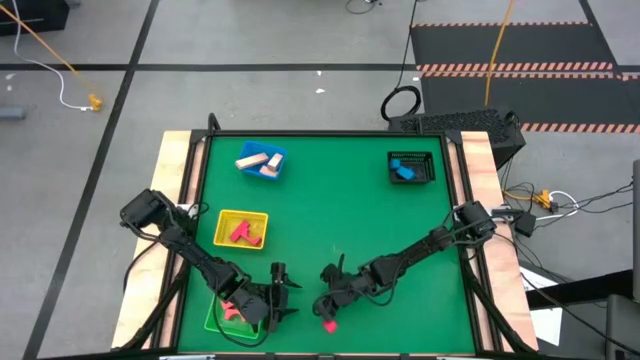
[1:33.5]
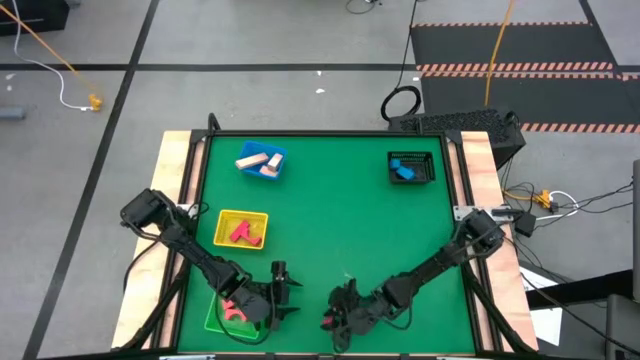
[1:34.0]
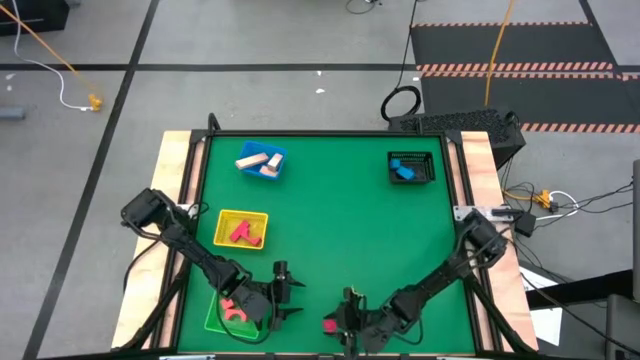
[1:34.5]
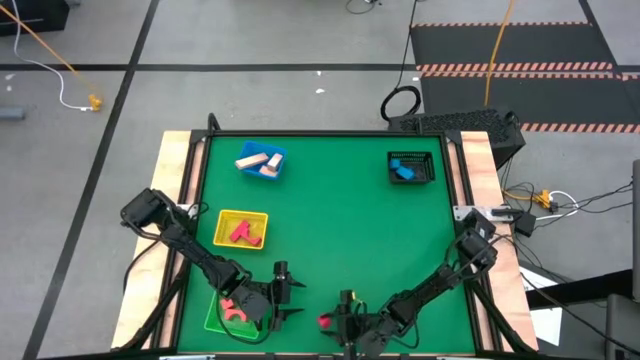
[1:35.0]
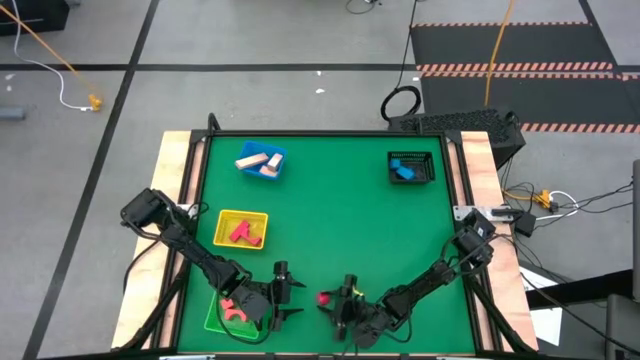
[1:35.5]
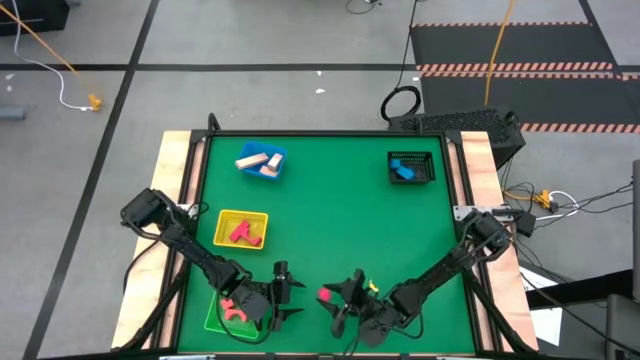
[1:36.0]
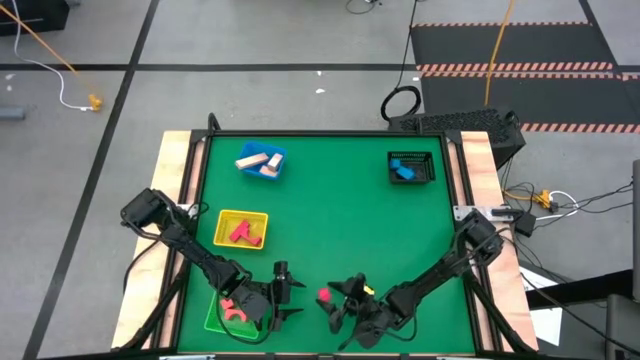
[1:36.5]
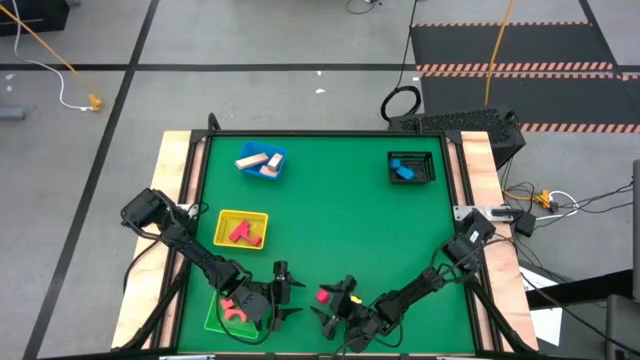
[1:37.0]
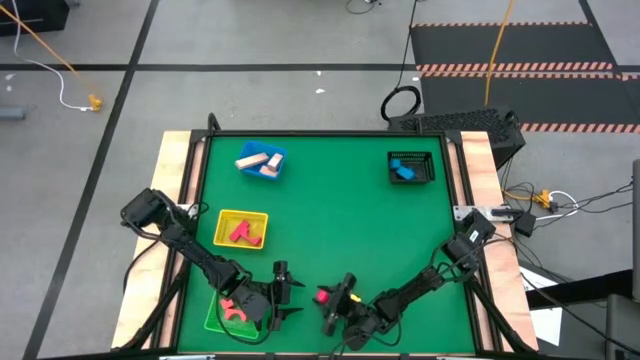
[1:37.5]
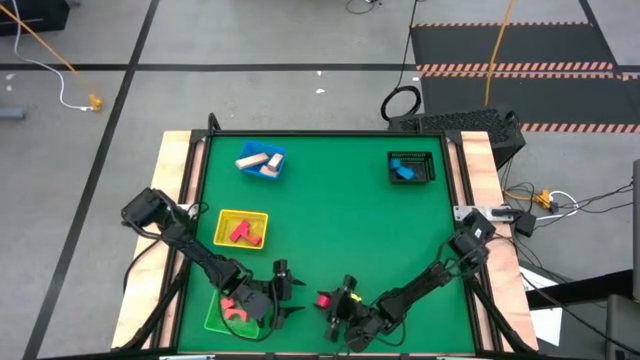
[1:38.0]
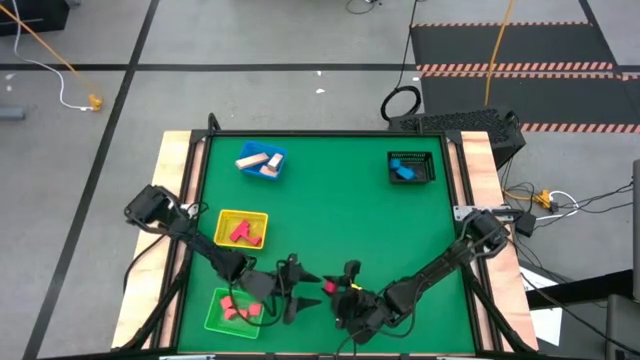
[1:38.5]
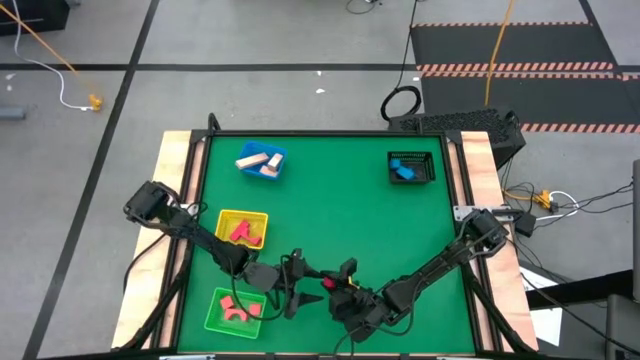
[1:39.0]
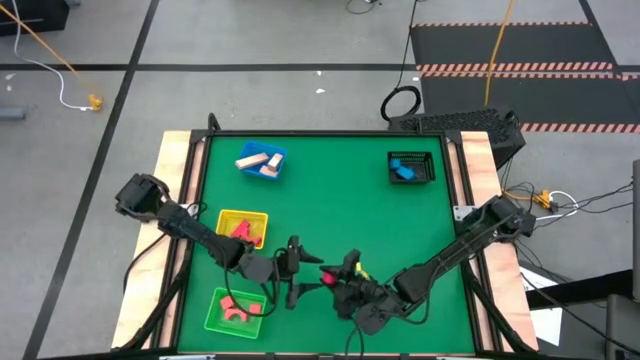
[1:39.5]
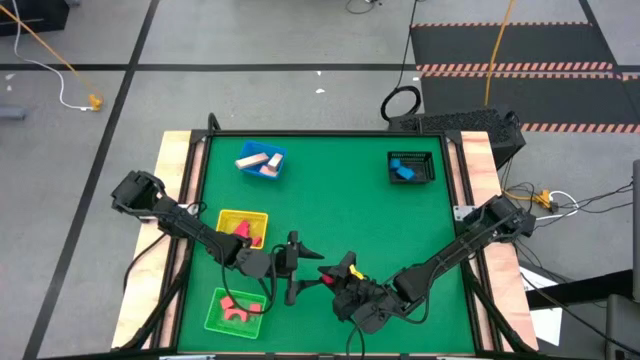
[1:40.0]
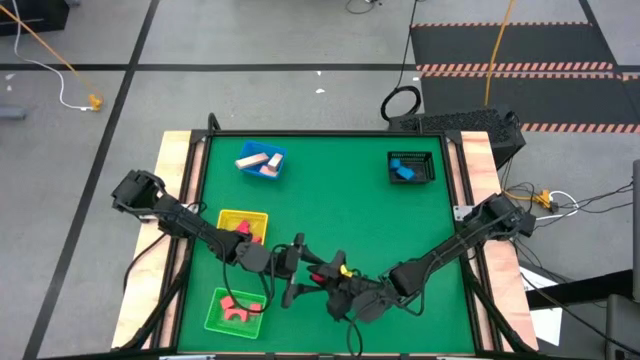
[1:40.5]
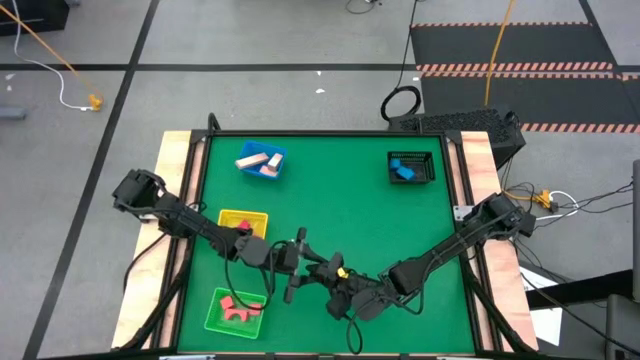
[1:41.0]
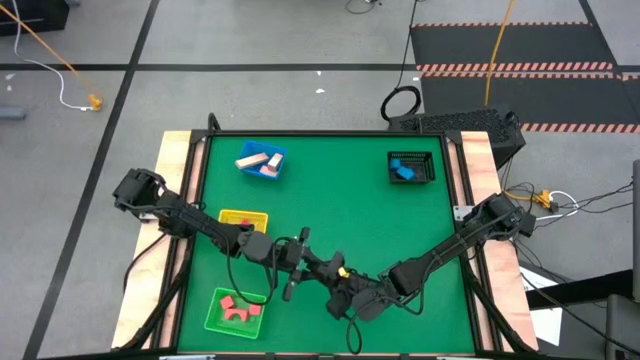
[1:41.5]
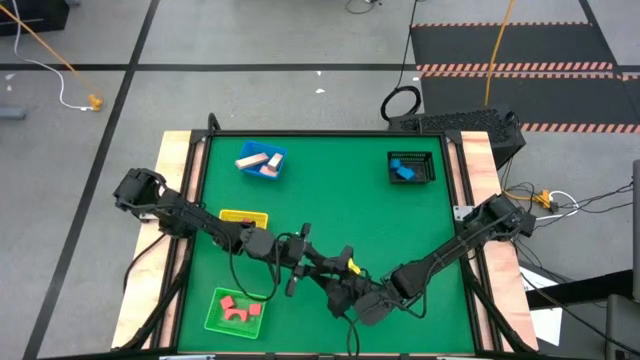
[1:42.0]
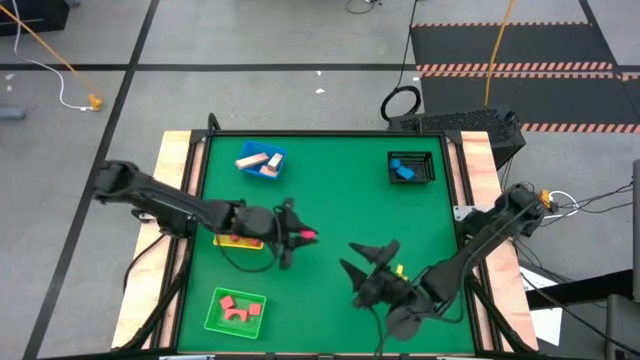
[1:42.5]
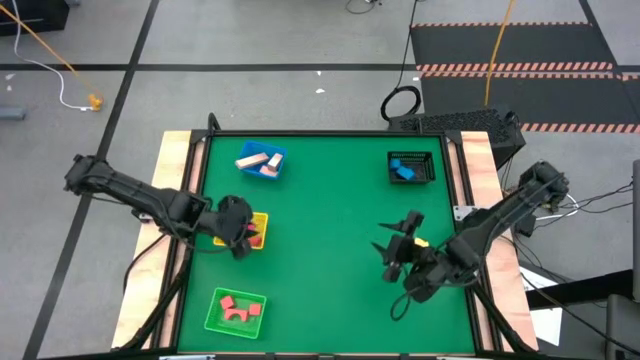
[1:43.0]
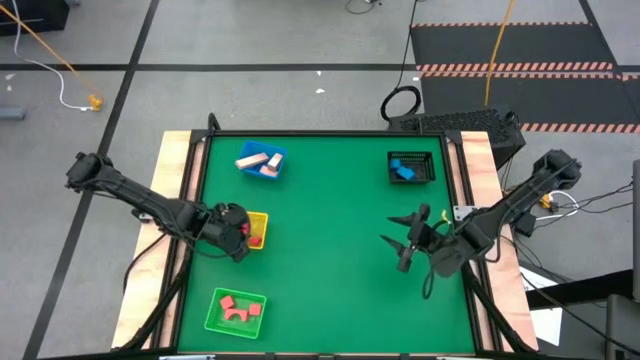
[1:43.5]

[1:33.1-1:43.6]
Task: Sort & place blocks by color
Put the red block into the yellow bin

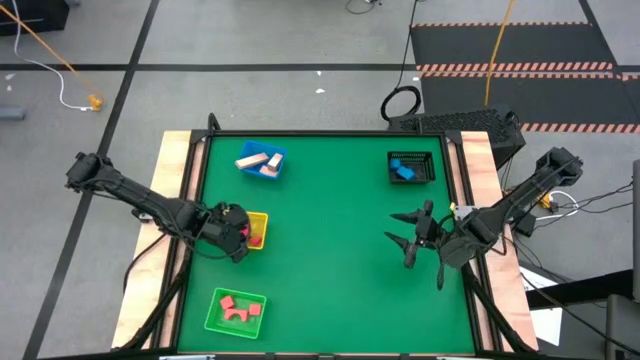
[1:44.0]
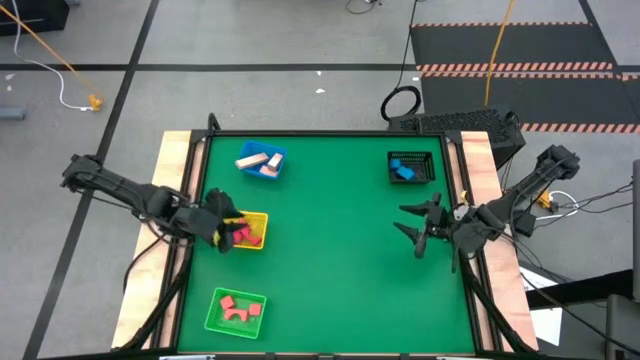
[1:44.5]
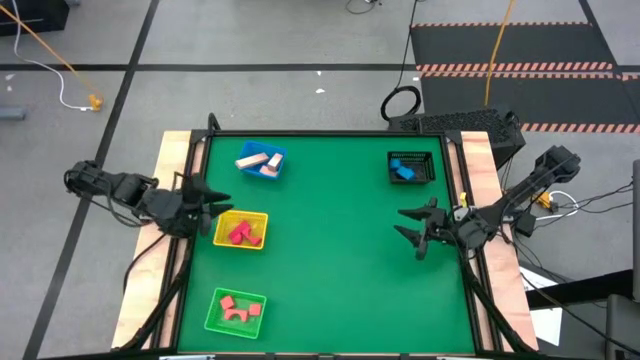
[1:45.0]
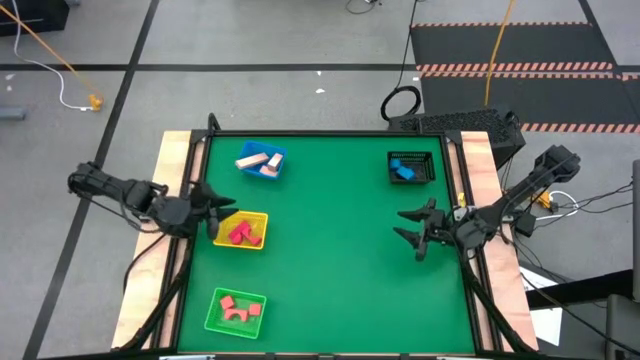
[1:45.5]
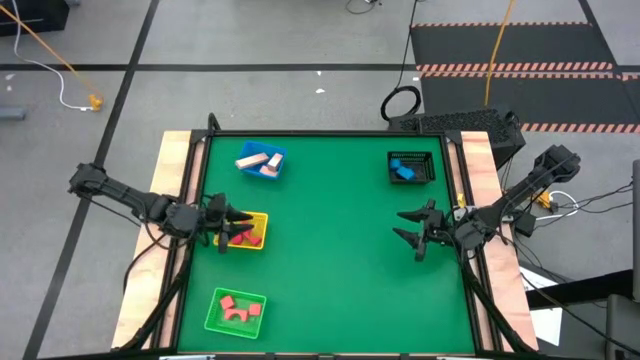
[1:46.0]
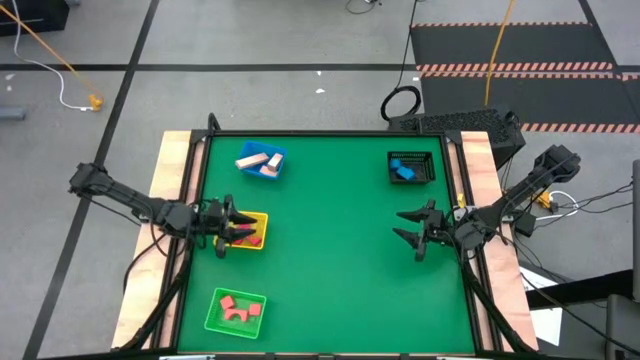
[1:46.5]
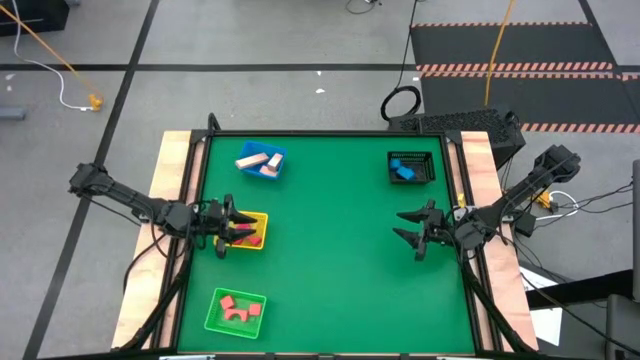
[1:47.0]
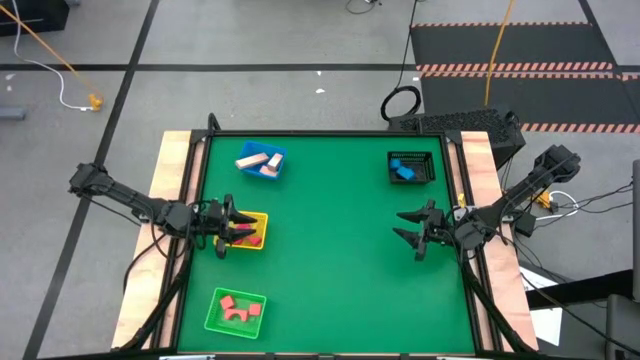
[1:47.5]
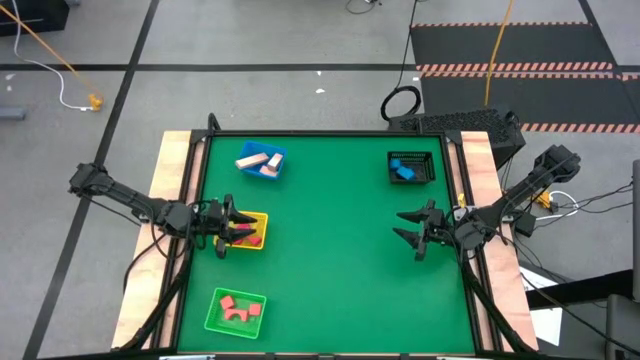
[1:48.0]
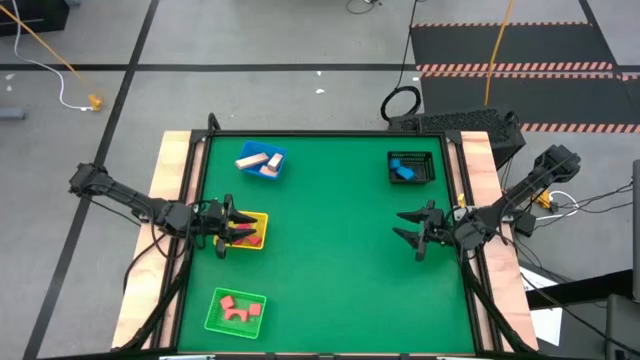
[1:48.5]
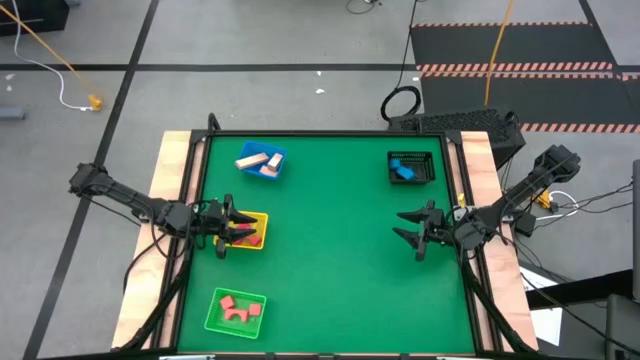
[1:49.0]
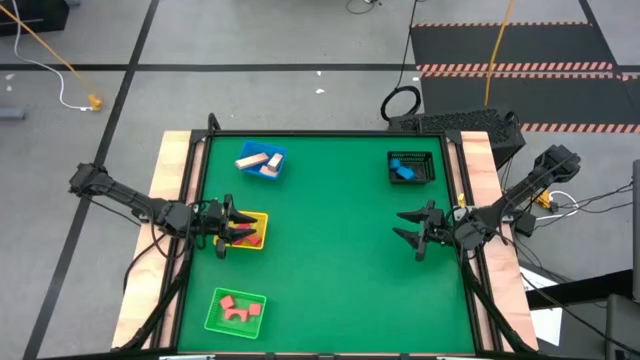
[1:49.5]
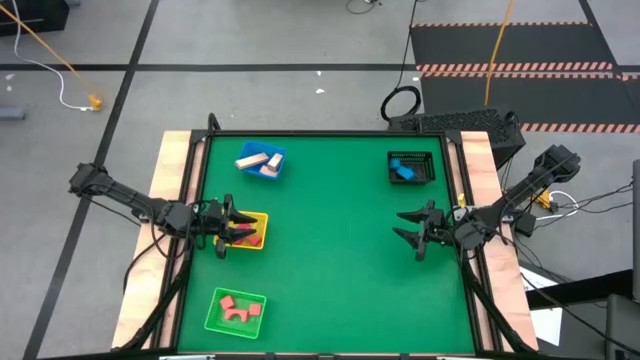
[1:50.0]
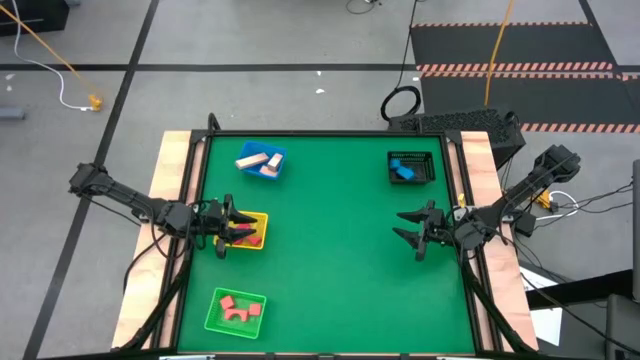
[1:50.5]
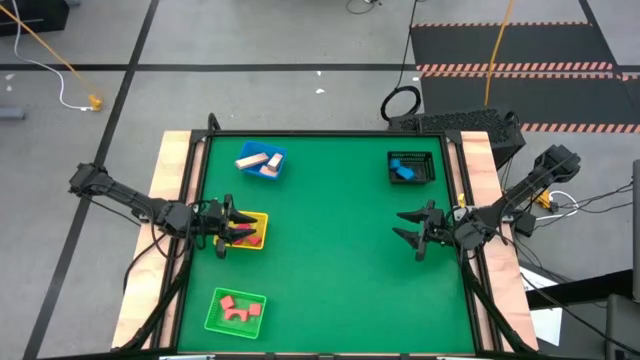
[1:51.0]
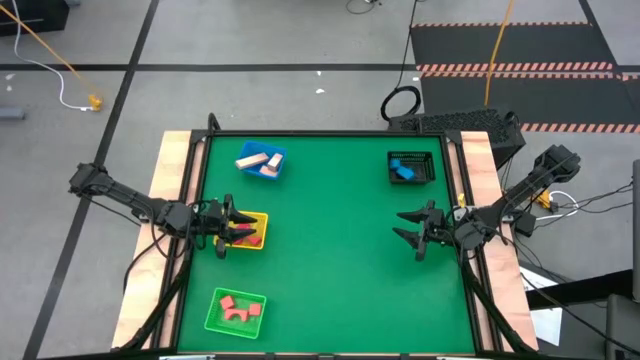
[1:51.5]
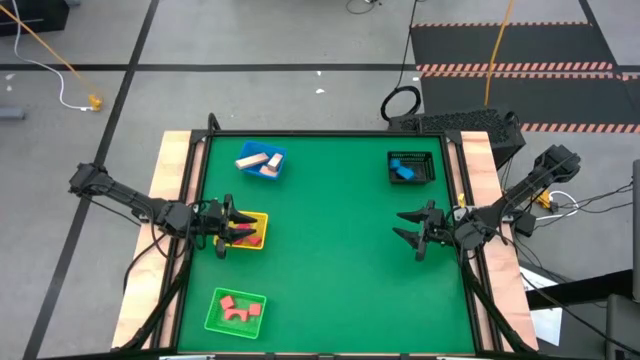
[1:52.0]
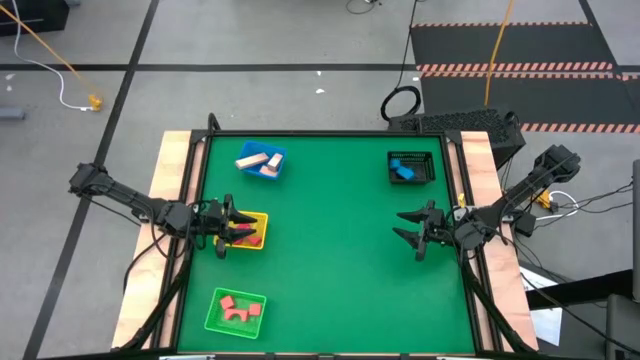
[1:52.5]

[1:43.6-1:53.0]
Return to Home Position

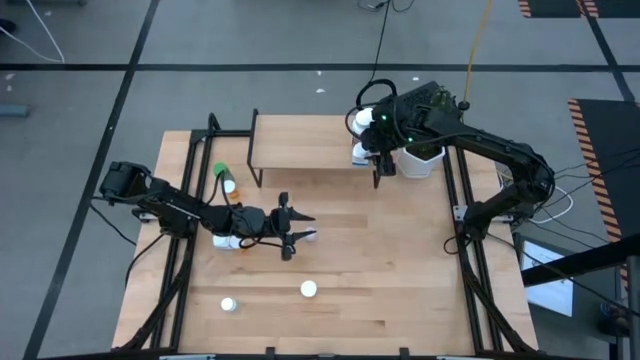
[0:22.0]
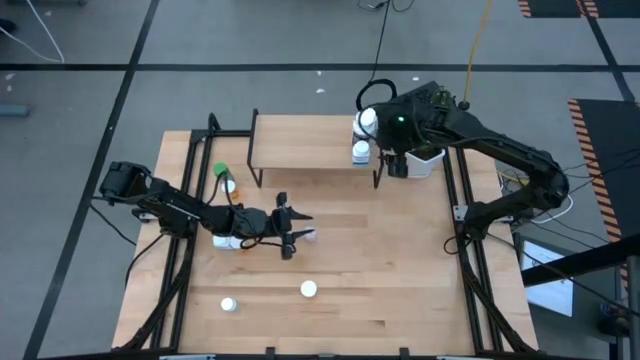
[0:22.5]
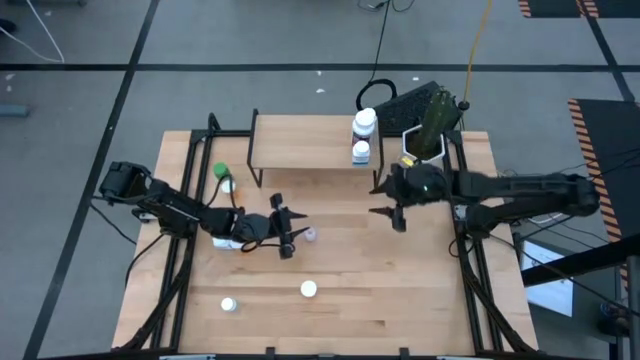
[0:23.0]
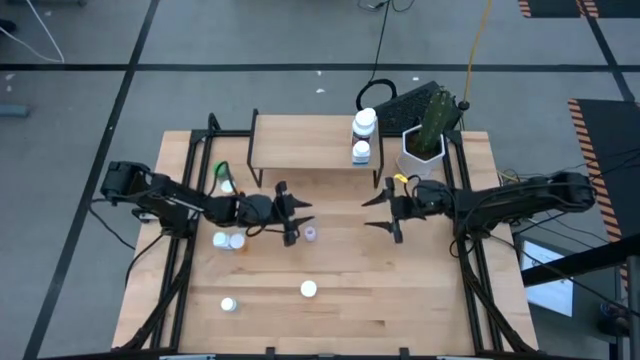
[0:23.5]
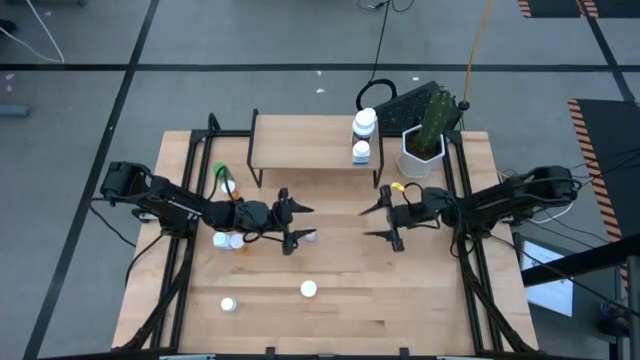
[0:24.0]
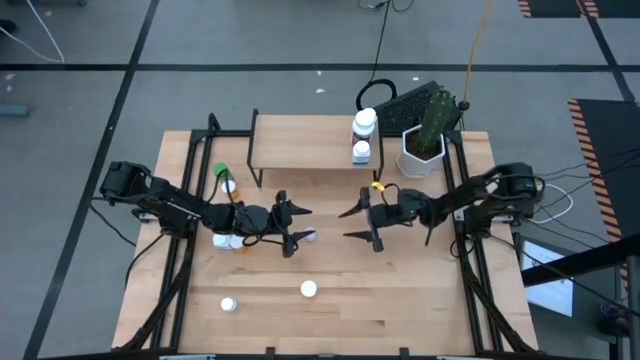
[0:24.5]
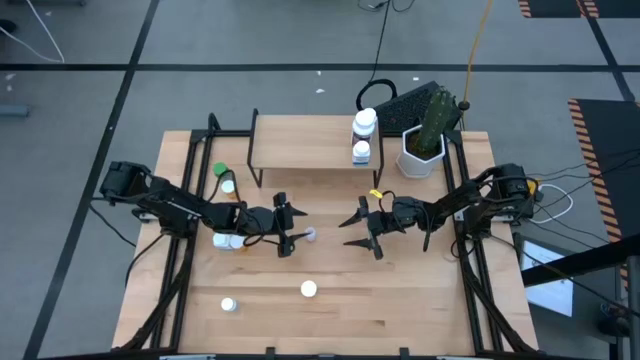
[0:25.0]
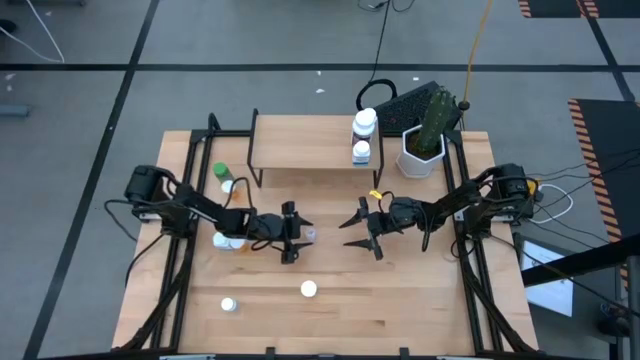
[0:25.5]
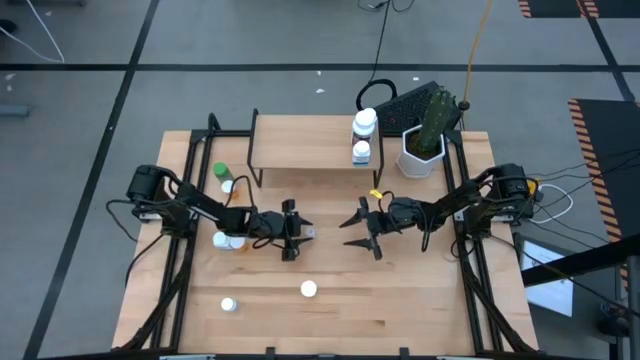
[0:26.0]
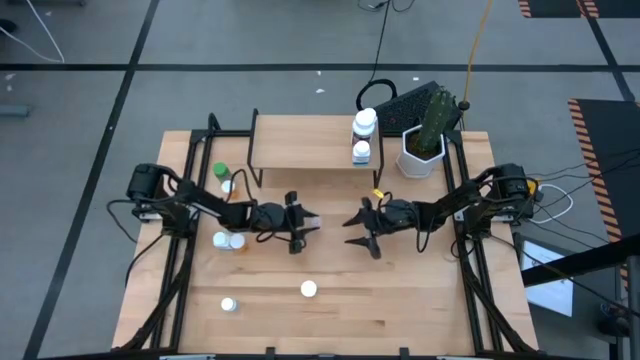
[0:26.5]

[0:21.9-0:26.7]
Task: Pick and place medicine bottles onto shelf by color
Put the transparent medicine bottle on the shelf
